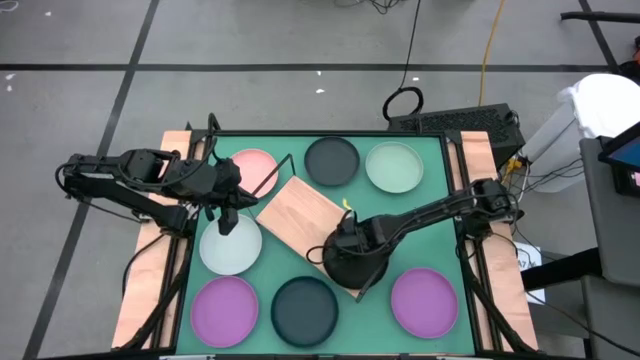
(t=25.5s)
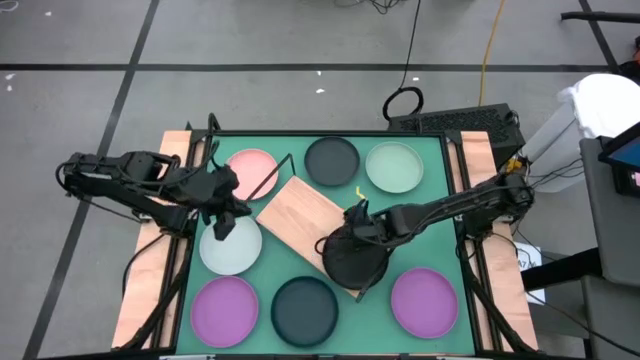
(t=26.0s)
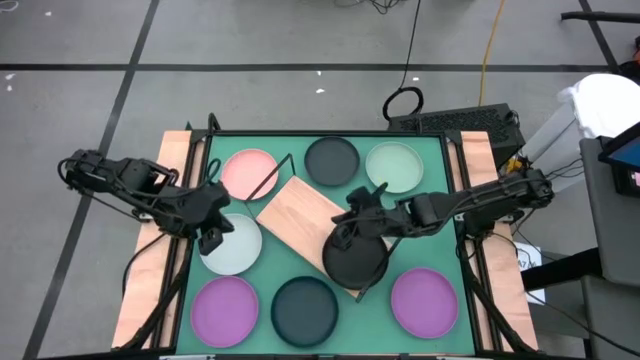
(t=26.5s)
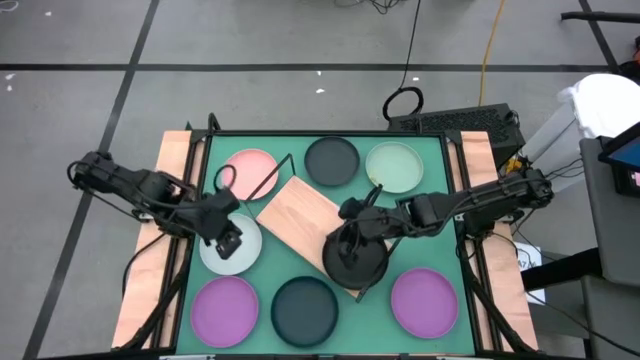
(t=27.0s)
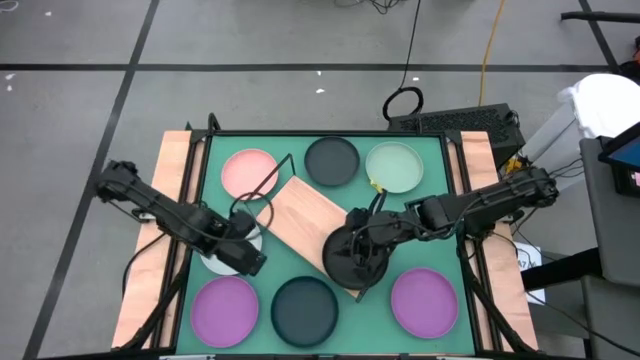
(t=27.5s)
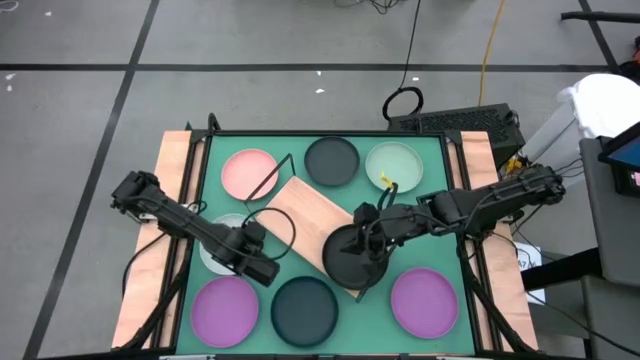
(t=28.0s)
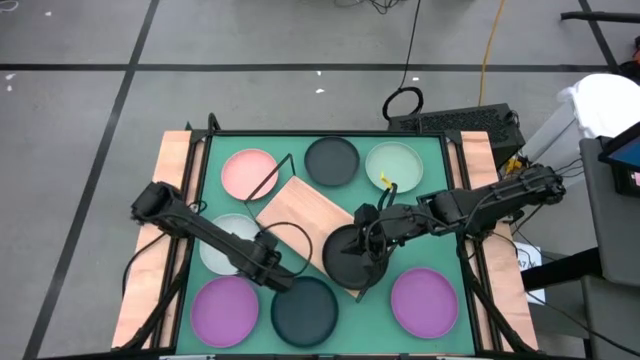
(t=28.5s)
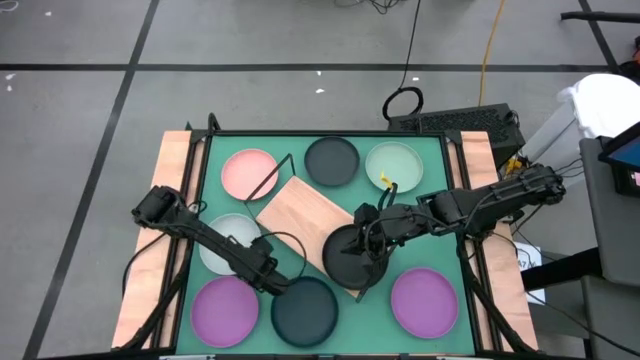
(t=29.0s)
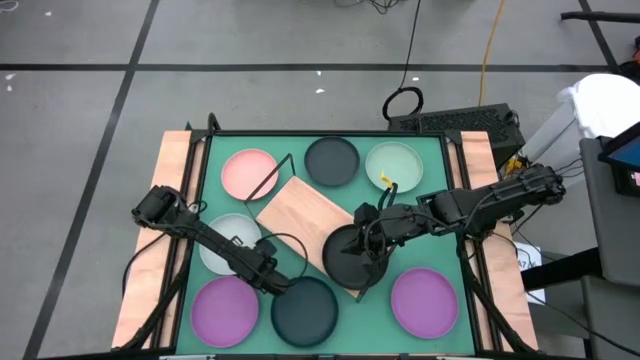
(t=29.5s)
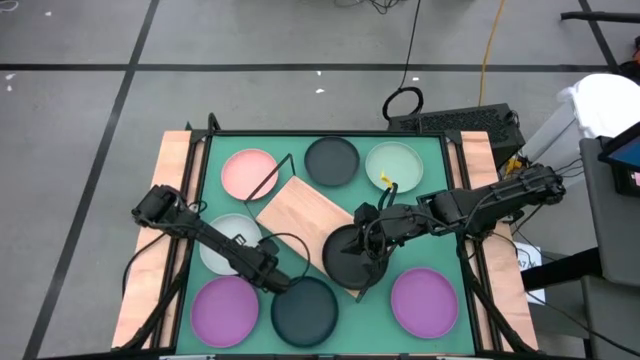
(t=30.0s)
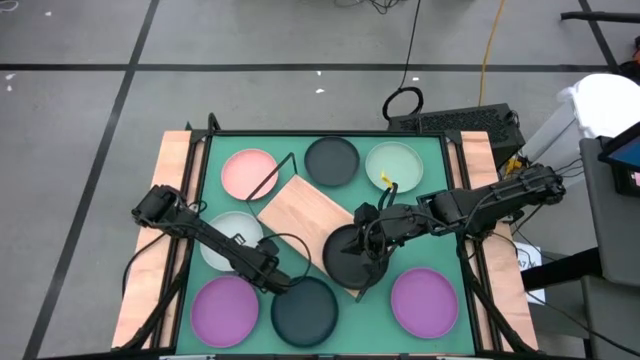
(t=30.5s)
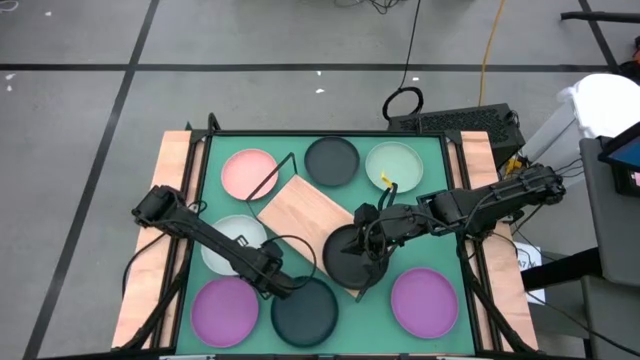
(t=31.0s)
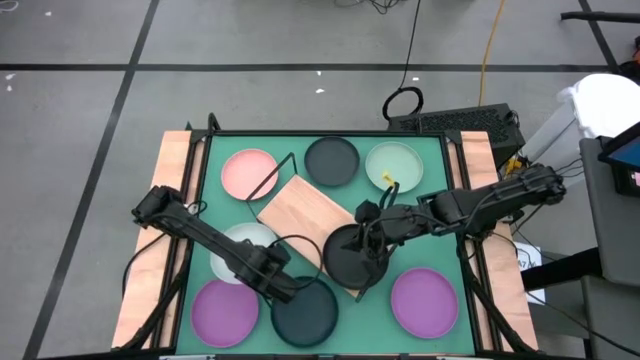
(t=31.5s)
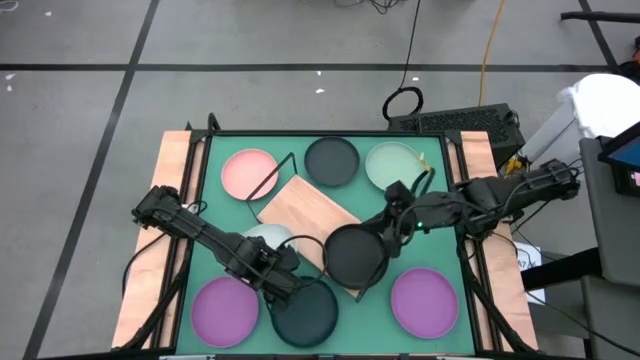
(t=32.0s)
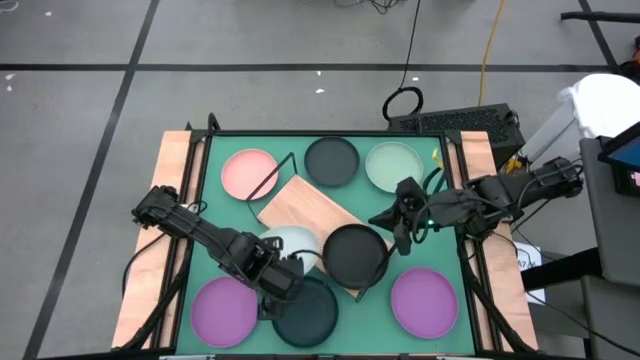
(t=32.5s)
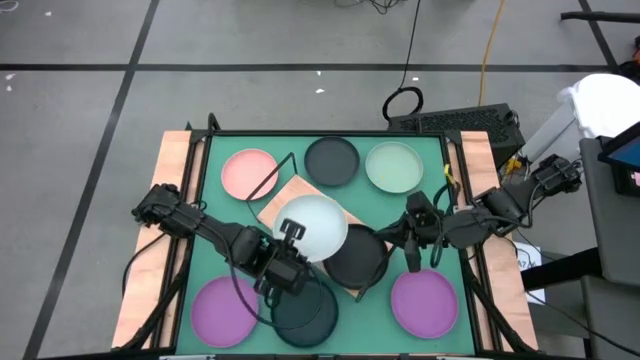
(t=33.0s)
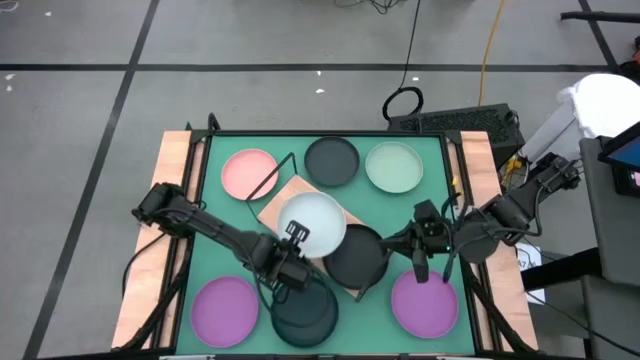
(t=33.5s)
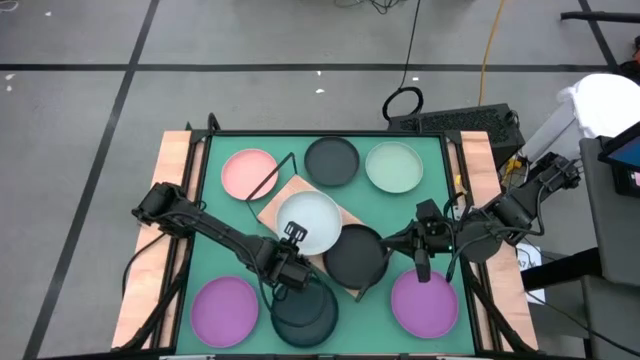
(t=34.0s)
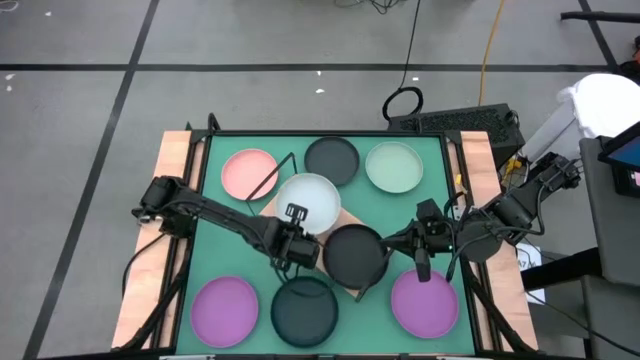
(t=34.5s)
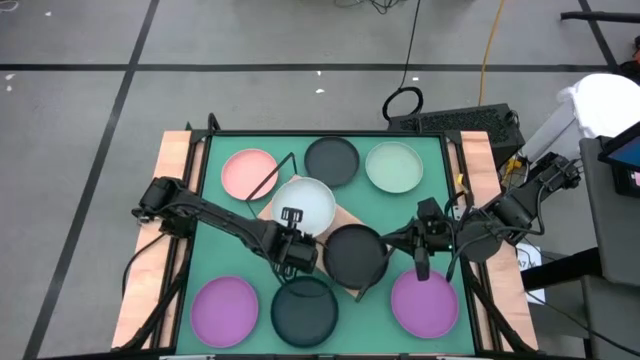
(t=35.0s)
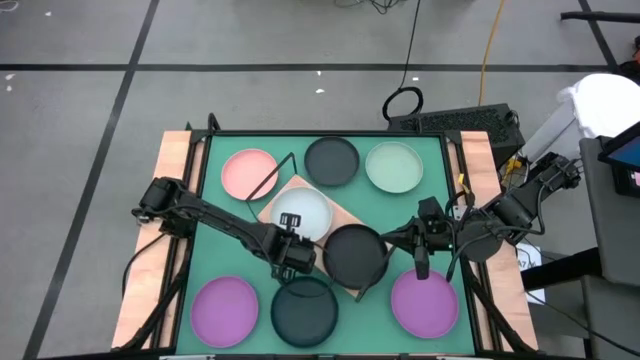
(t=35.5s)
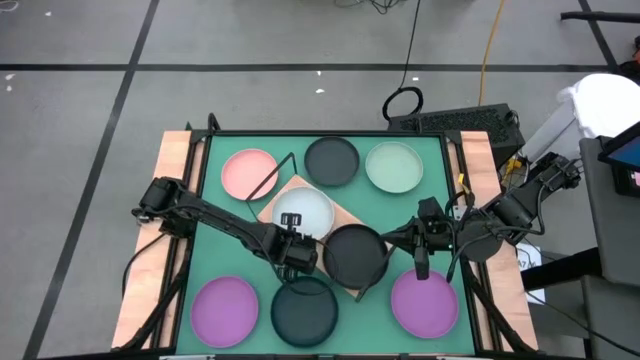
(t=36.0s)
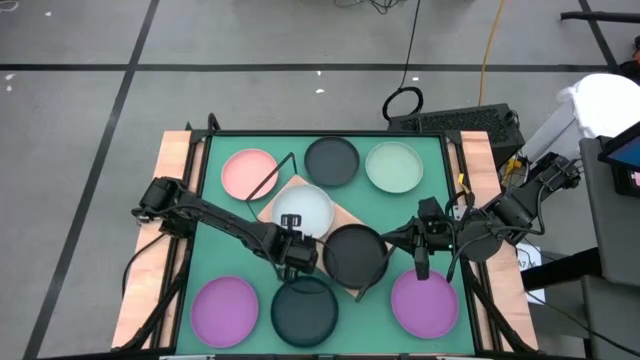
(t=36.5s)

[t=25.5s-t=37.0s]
Task: Place and stack plates onto a shelf
Put the gray plate on the shelf
